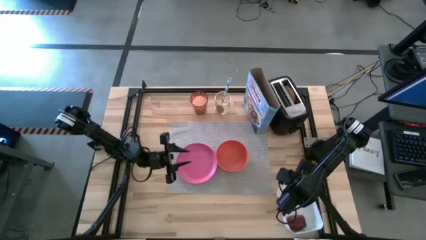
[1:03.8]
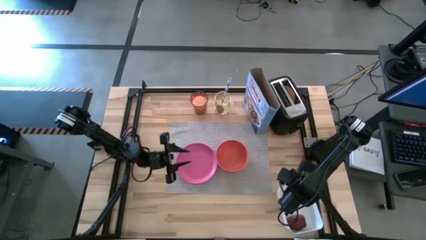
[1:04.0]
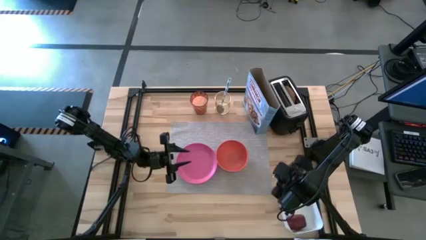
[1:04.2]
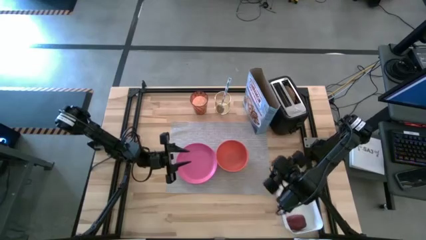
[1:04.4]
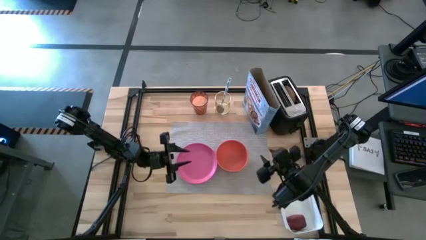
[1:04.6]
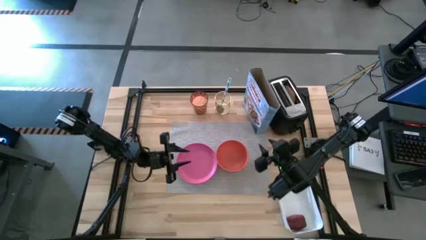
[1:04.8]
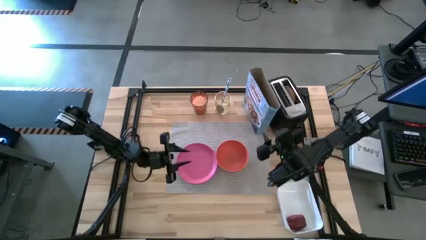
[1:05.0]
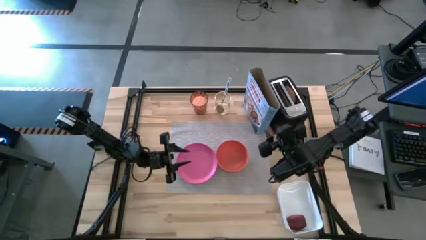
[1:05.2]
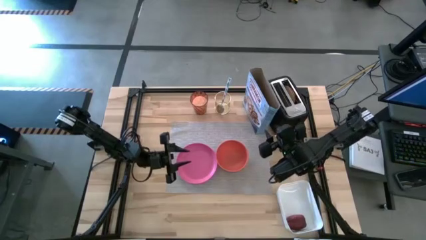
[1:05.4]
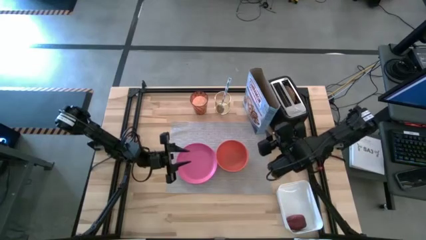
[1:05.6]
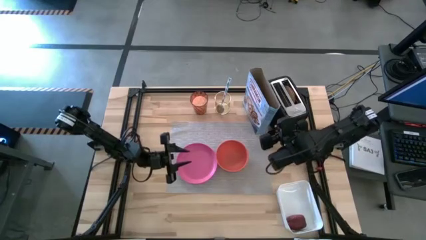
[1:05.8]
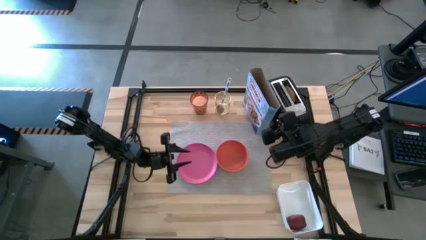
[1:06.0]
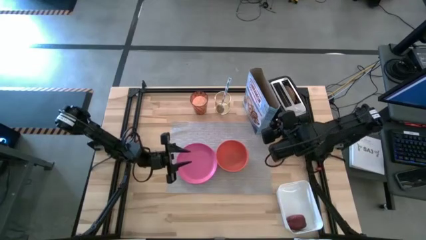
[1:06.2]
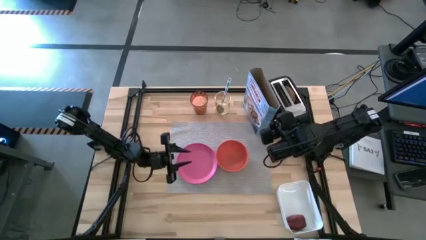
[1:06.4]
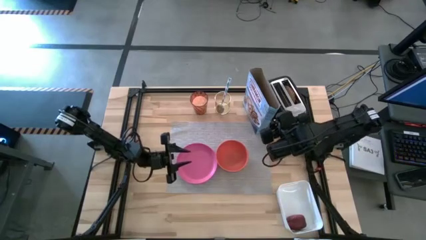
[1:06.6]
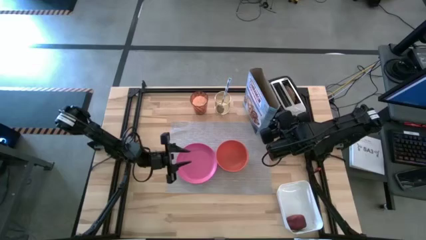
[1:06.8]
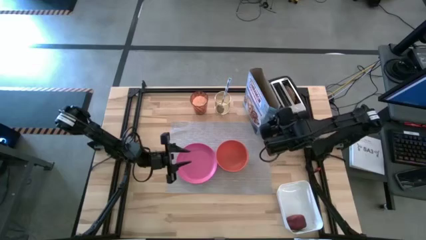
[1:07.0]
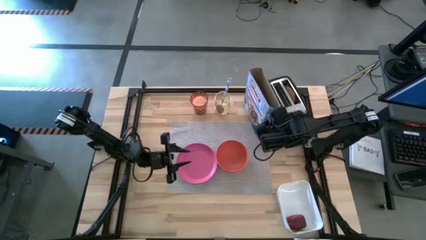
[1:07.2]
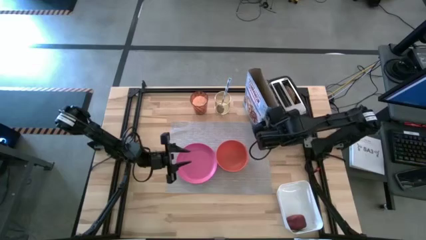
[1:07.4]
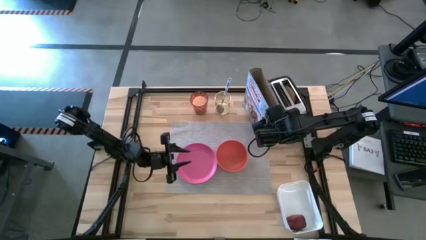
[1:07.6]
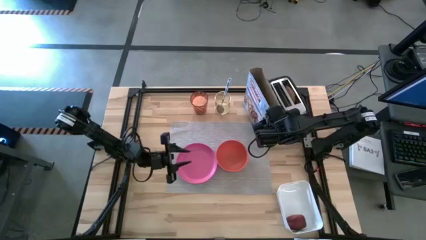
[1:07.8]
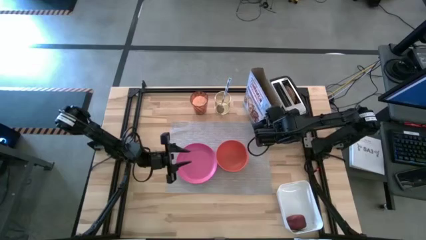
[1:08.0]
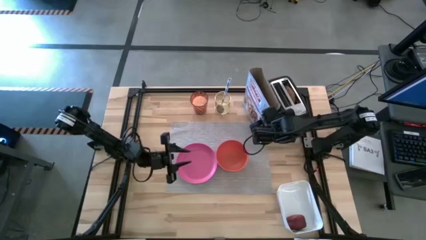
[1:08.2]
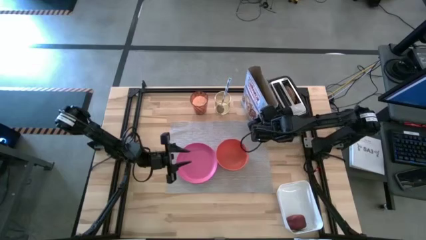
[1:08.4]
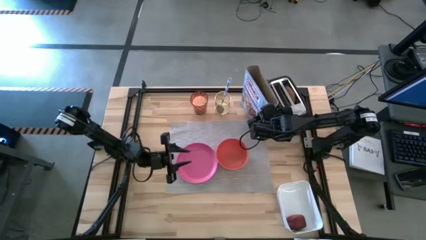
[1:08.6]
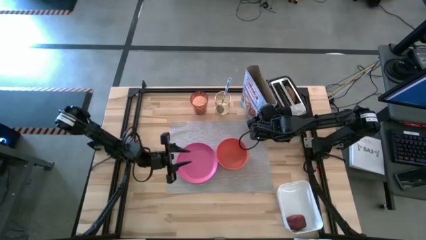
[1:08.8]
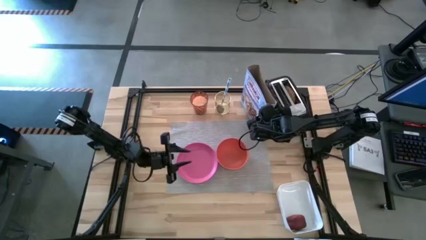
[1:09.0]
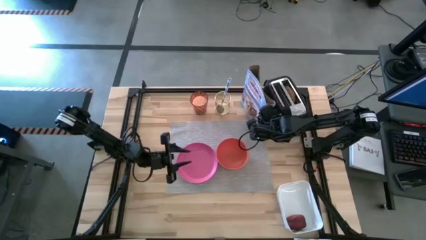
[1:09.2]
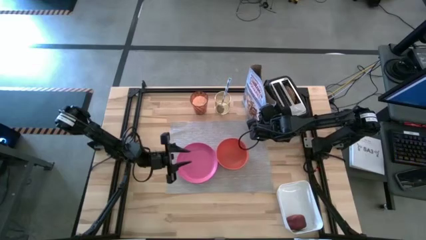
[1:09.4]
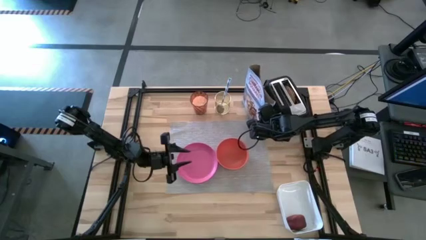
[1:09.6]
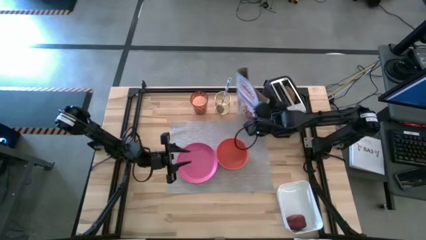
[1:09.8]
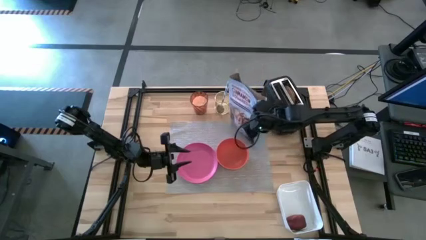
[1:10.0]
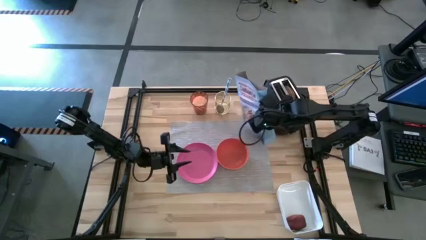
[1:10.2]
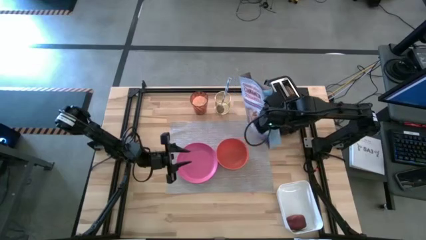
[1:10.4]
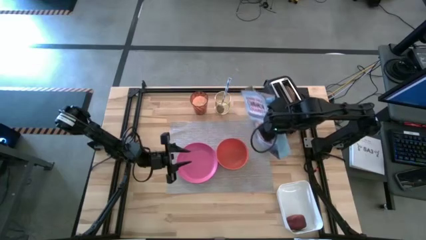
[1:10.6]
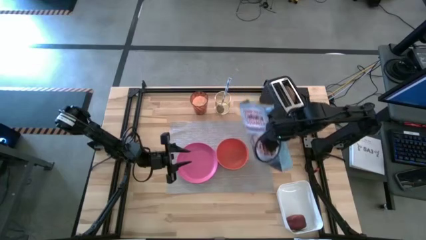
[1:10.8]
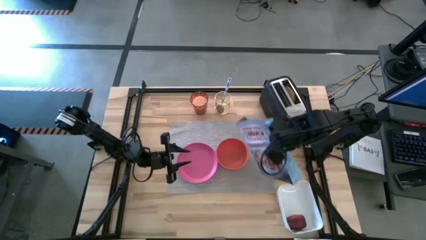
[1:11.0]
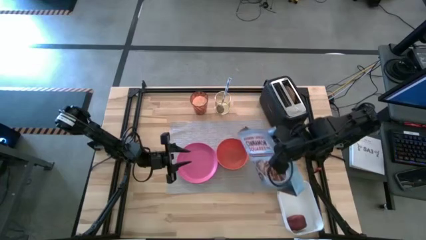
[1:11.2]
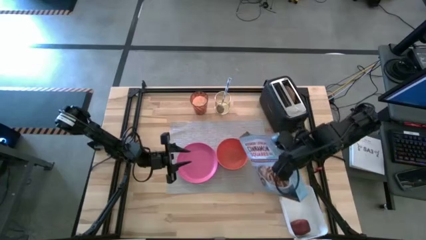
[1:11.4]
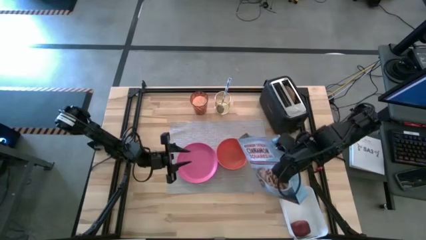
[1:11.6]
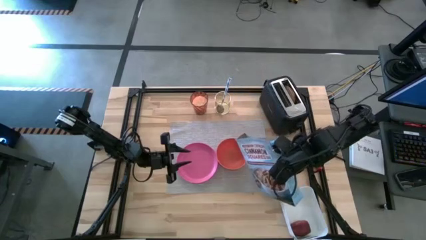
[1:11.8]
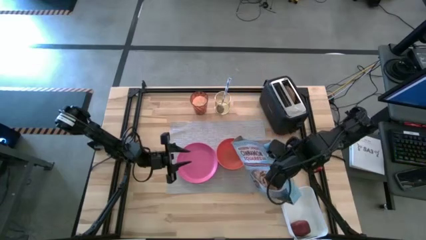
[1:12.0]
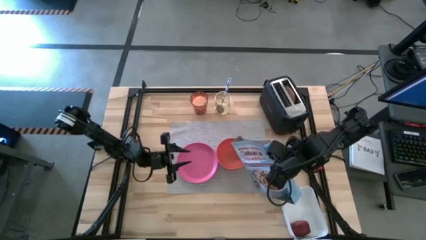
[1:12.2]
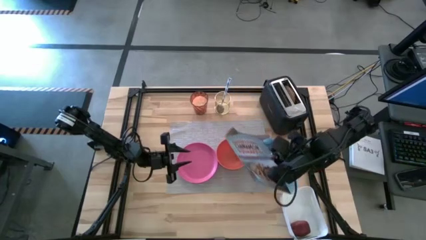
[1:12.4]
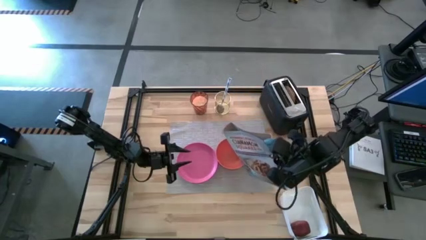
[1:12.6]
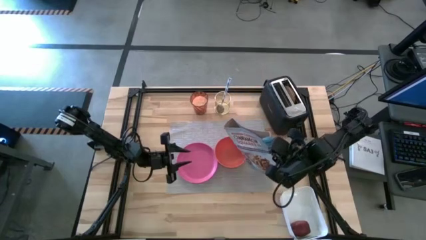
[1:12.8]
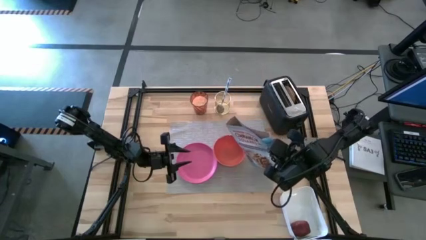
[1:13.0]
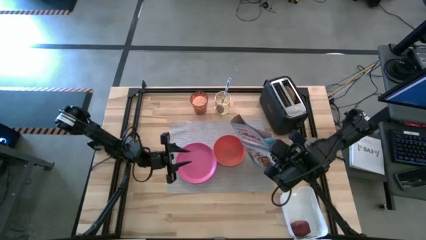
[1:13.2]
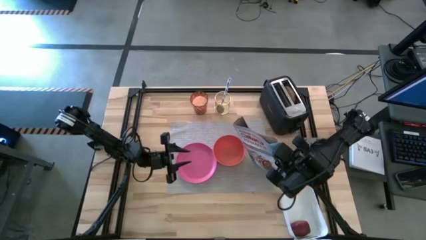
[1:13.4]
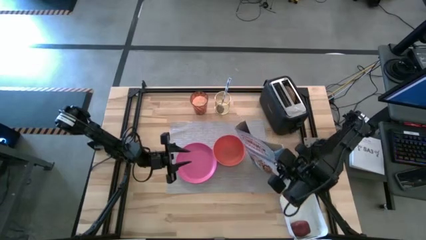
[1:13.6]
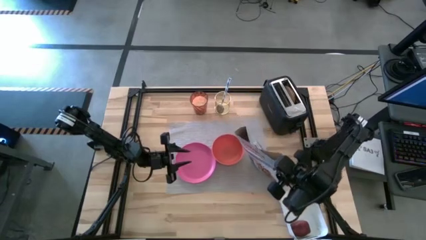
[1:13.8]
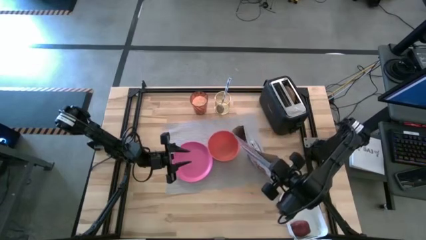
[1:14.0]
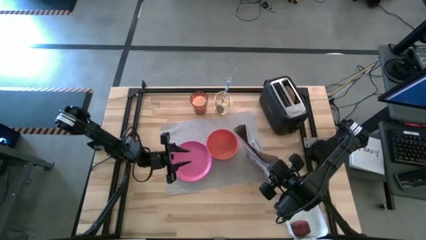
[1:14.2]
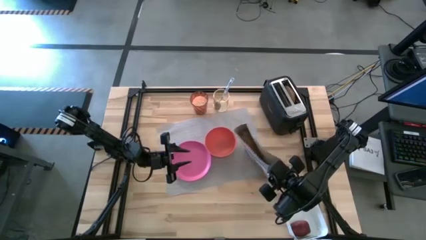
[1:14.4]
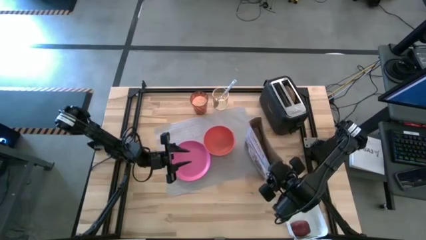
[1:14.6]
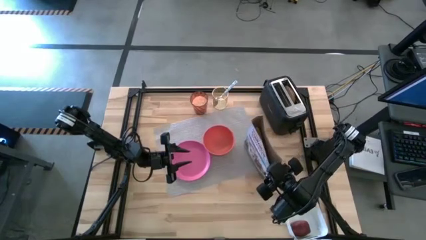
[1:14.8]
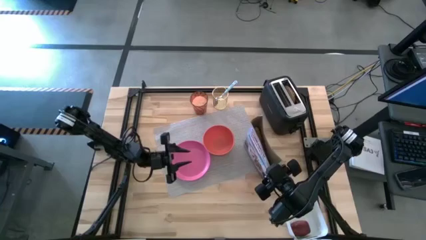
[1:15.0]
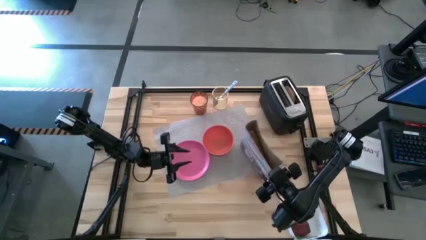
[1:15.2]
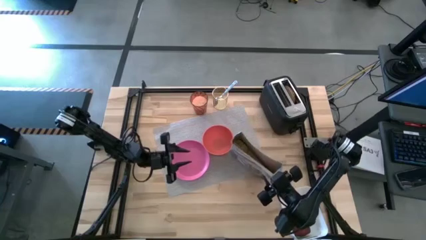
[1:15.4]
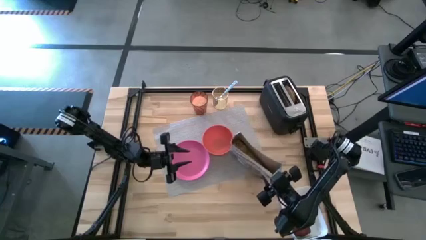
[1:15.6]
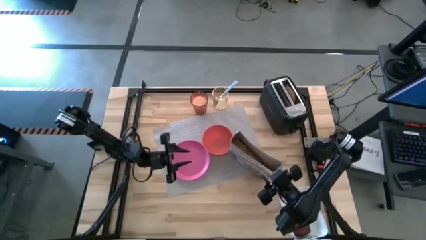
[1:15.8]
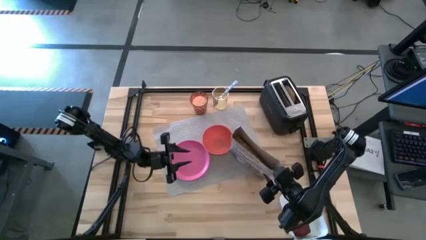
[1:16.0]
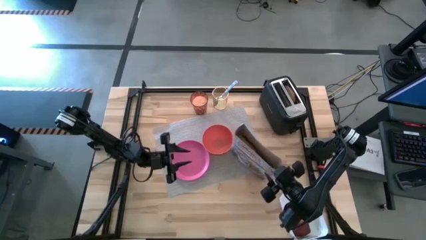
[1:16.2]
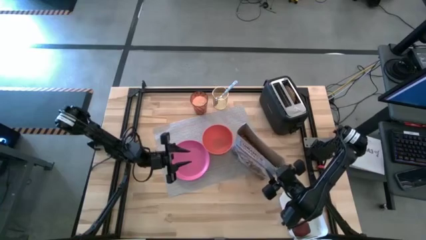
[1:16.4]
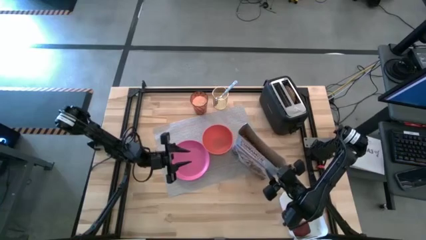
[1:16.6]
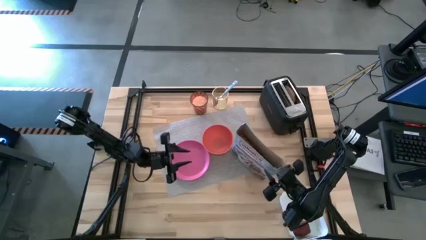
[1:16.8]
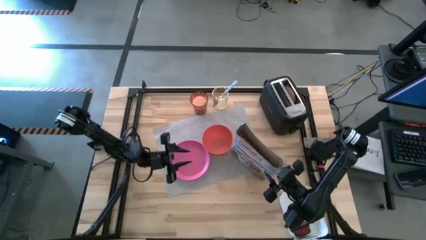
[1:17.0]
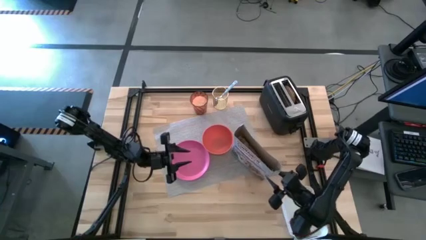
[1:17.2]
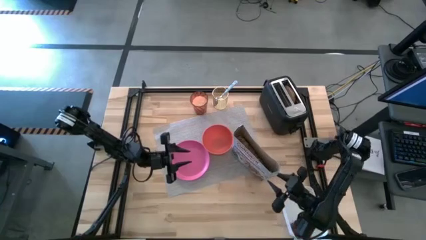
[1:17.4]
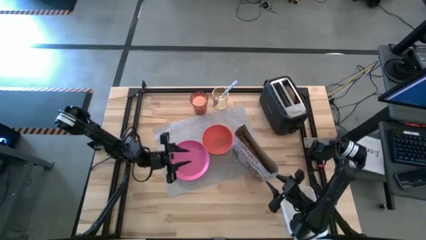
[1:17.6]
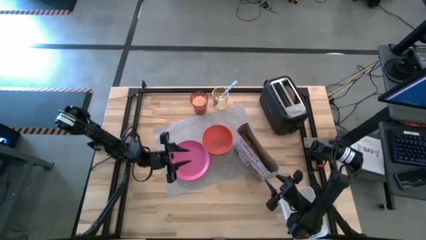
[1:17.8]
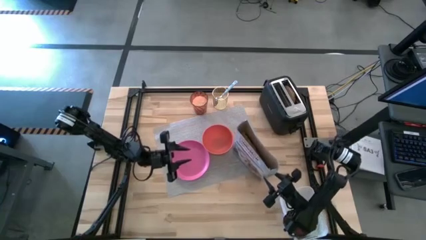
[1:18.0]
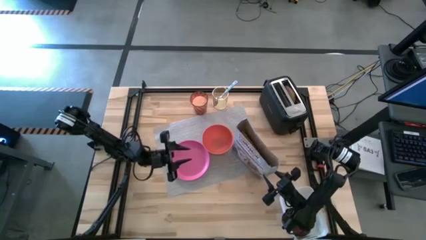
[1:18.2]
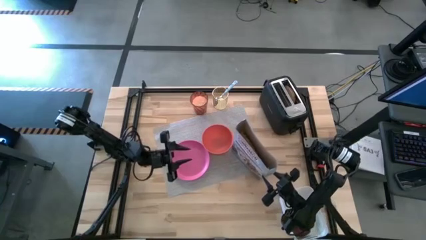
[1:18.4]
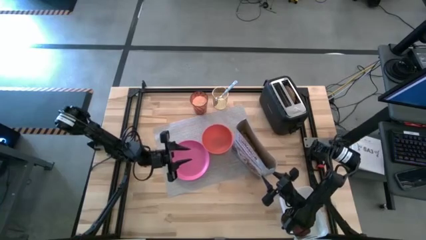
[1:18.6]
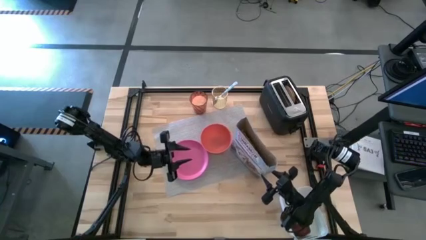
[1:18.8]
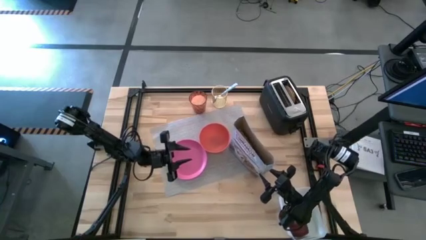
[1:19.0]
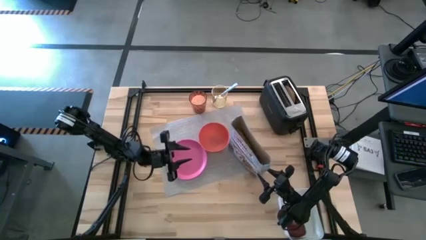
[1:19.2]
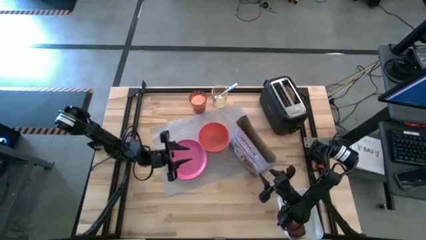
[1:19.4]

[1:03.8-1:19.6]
Task: Arrange a breakfast setting
Pour the cereal from the cereal box into the orange bowl
